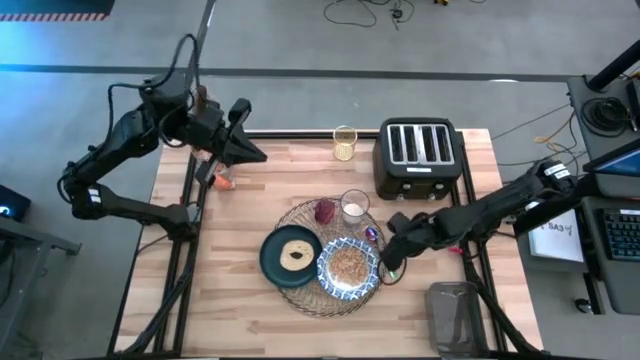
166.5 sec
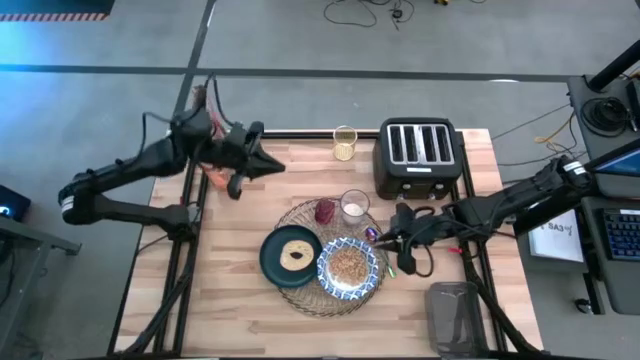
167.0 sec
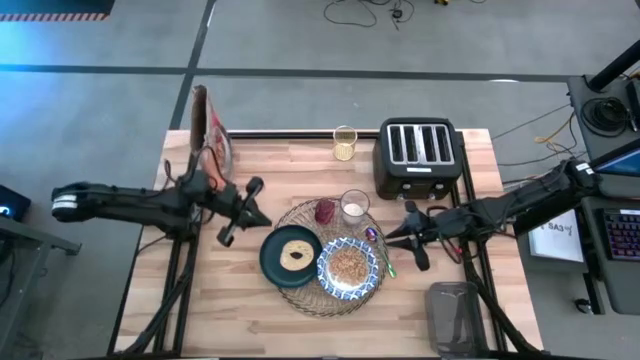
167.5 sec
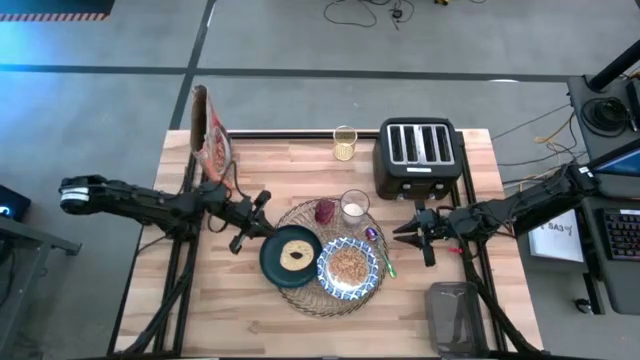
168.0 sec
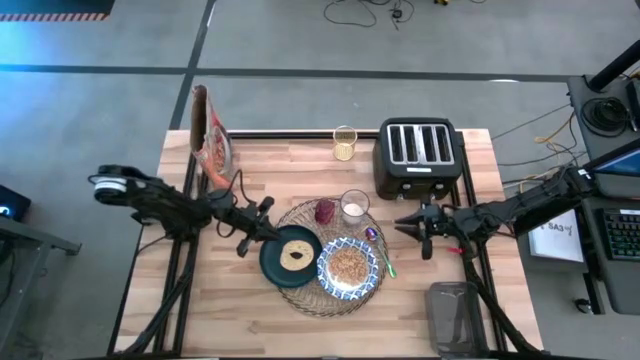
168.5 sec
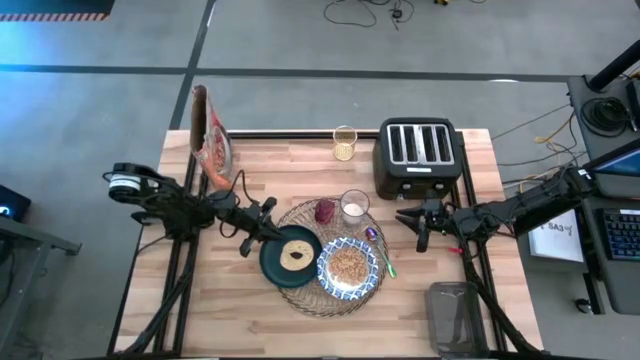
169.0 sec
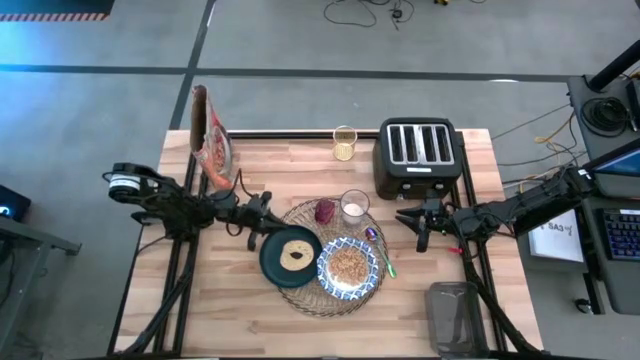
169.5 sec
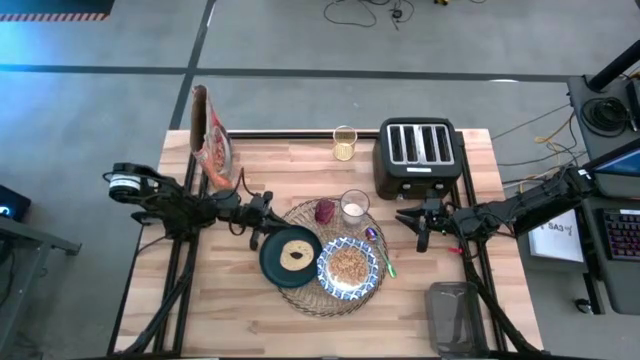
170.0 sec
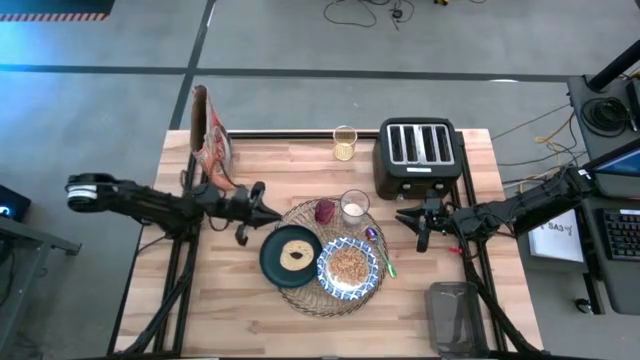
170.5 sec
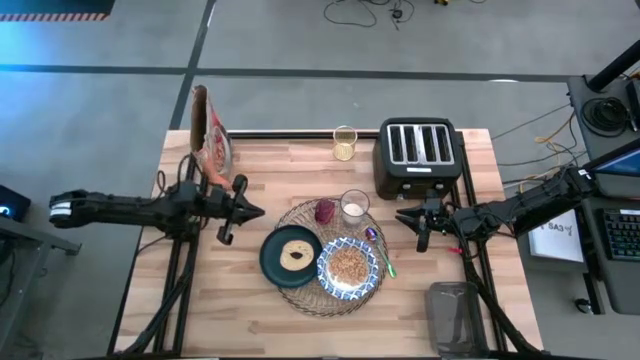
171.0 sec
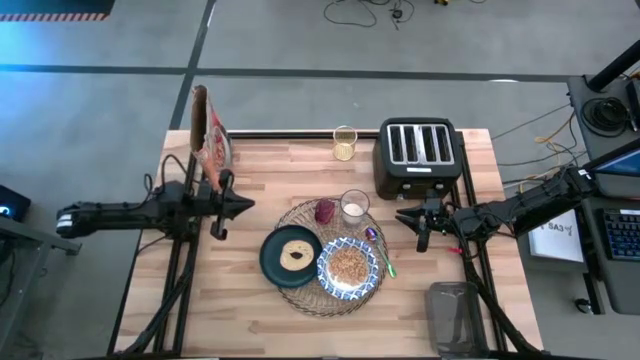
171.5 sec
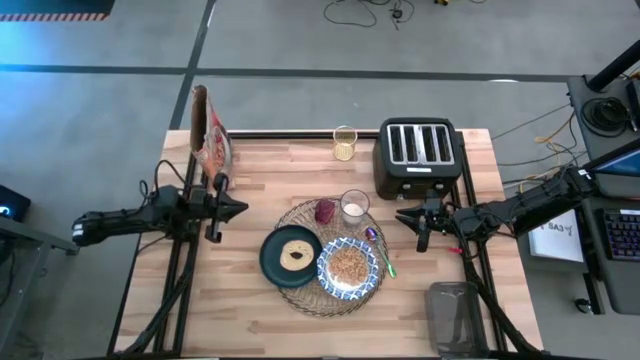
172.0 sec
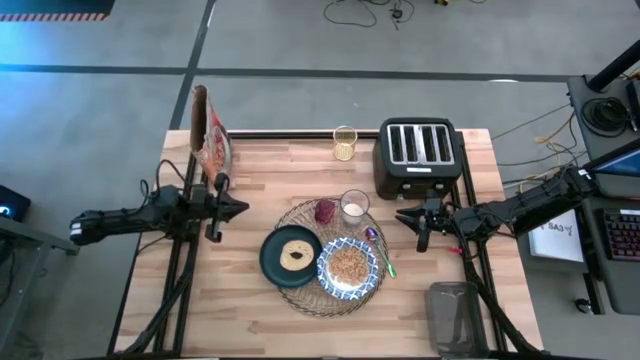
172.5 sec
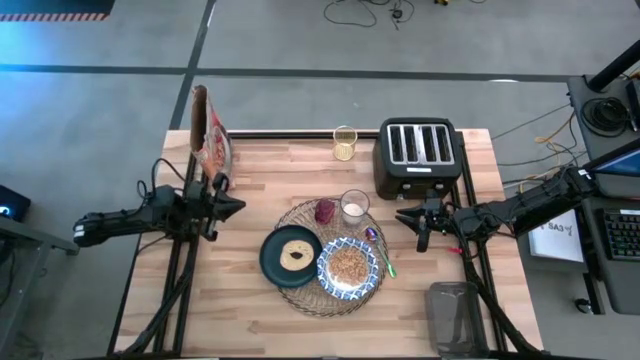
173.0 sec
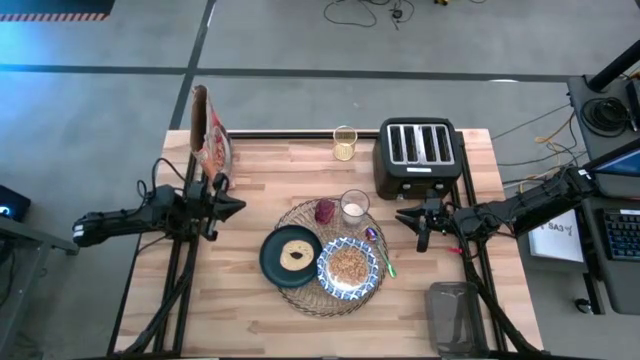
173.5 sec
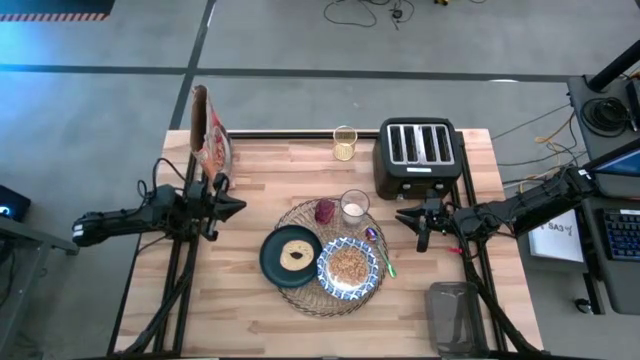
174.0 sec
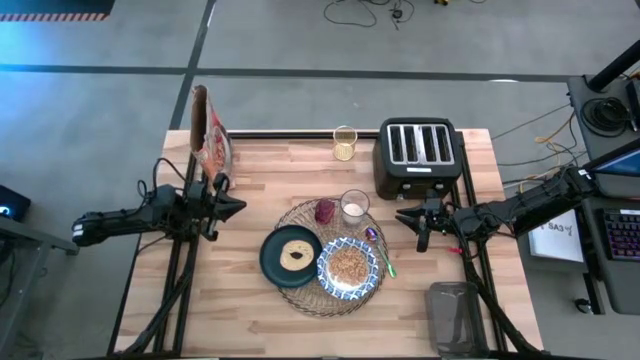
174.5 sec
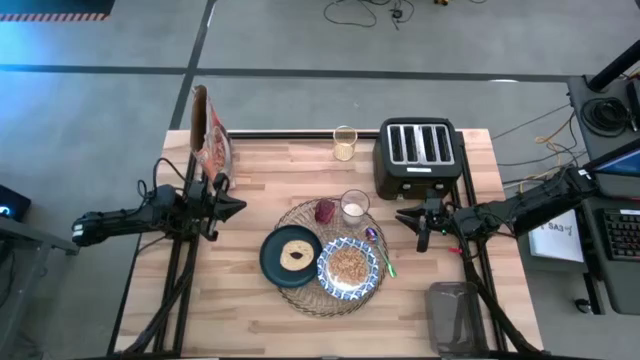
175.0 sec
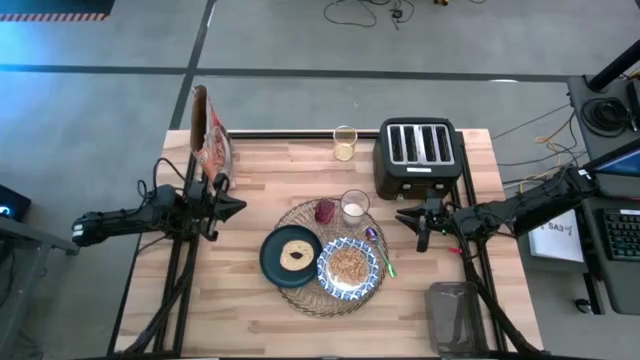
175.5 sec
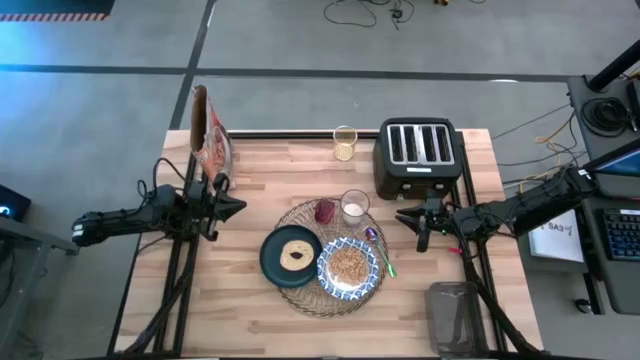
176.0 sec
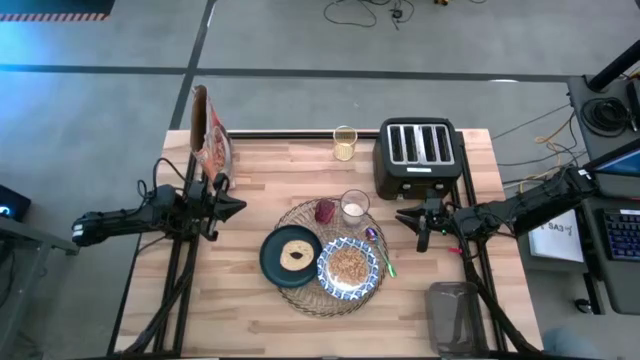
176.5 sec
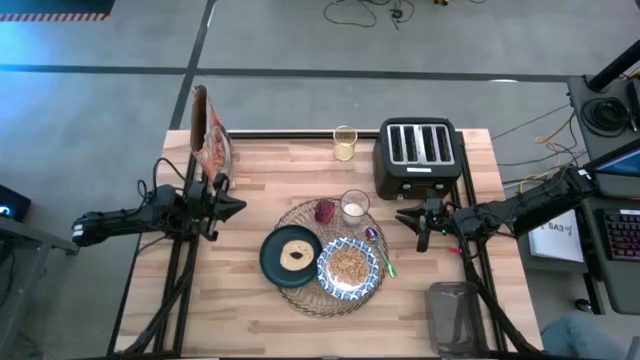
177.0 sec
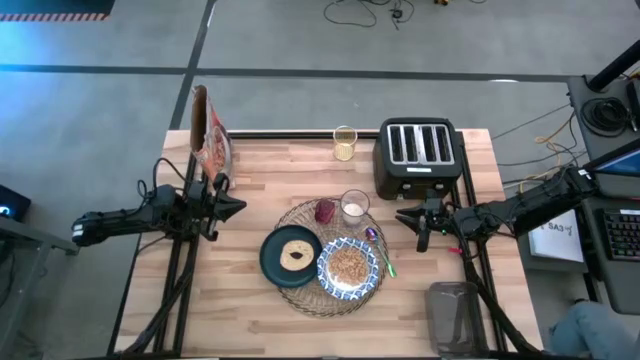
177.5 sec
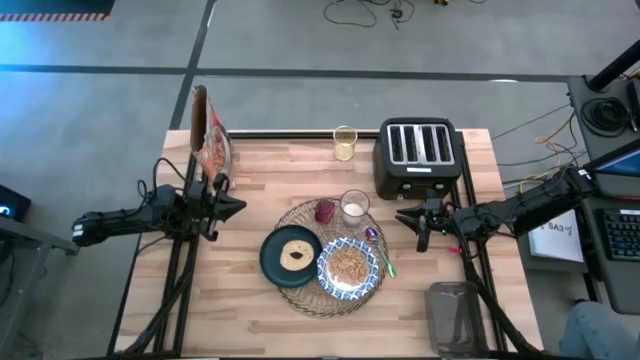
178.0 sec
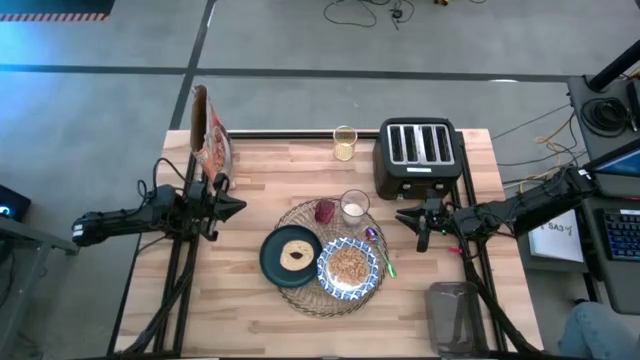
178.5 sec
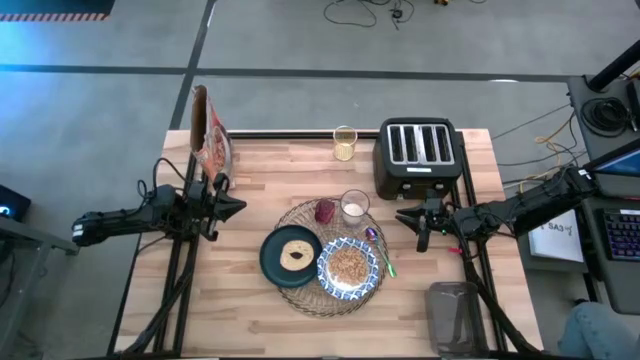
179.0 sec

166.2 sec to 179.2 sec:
Task: Arrange a breakfast setting
Return to Home Position

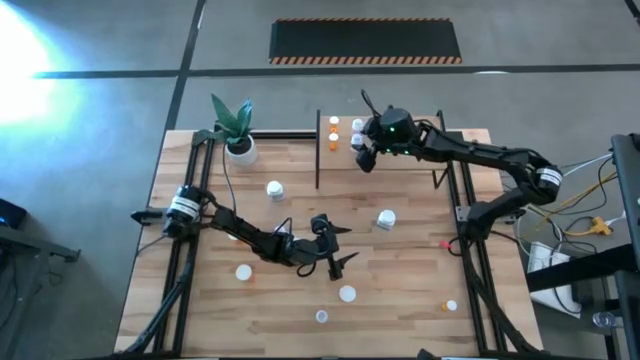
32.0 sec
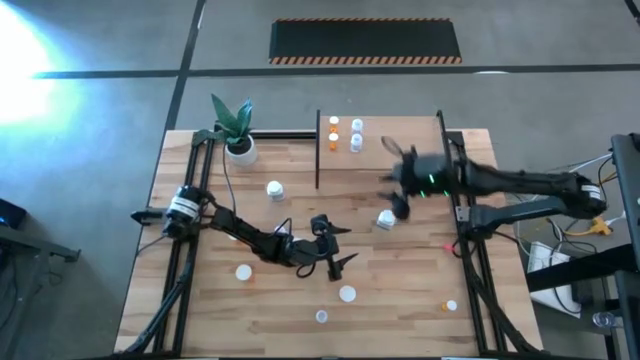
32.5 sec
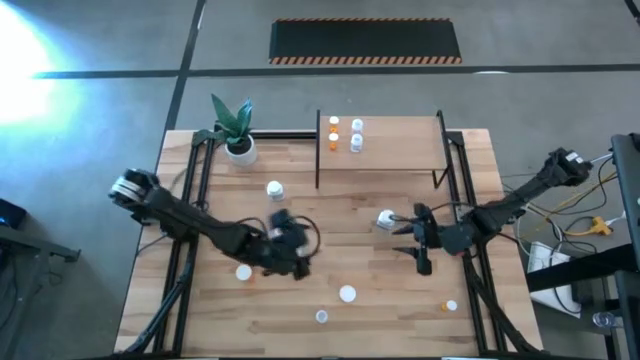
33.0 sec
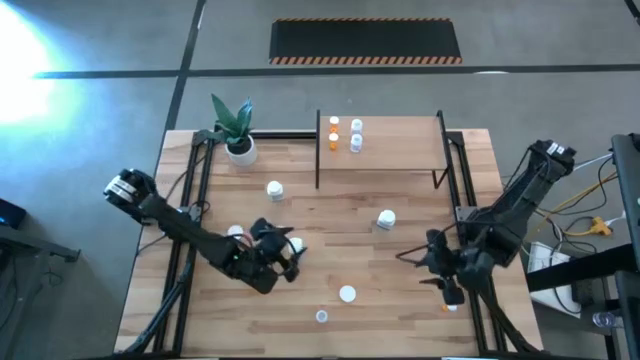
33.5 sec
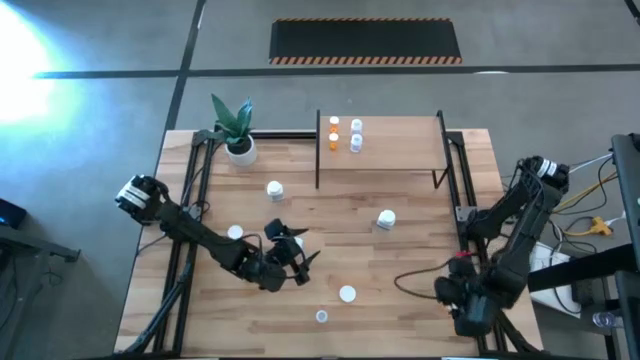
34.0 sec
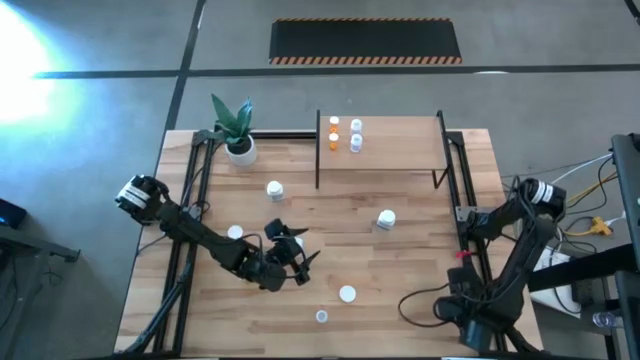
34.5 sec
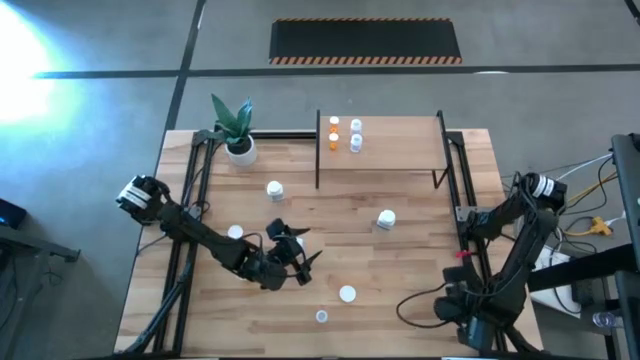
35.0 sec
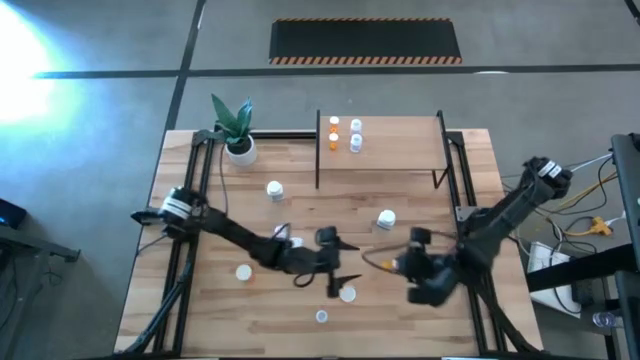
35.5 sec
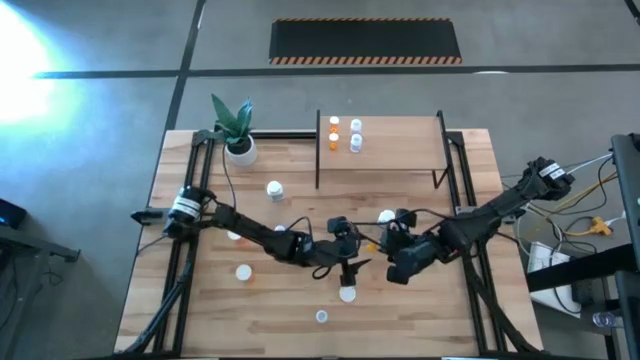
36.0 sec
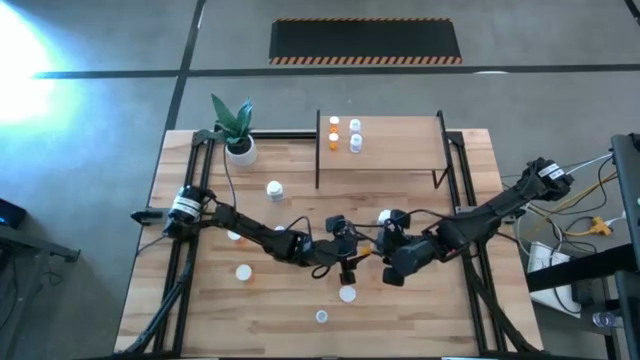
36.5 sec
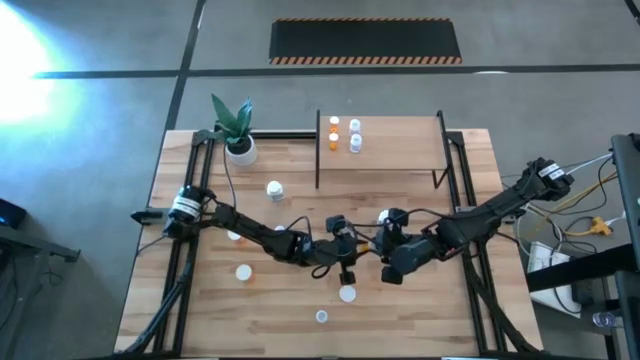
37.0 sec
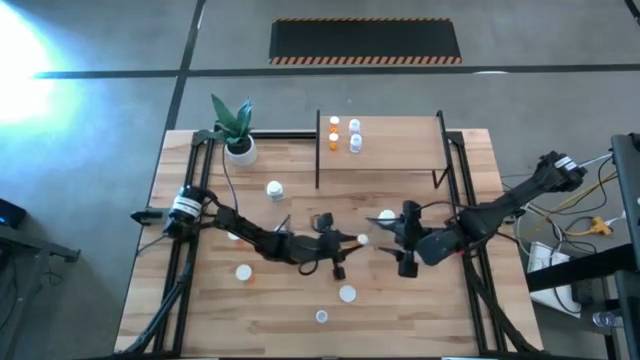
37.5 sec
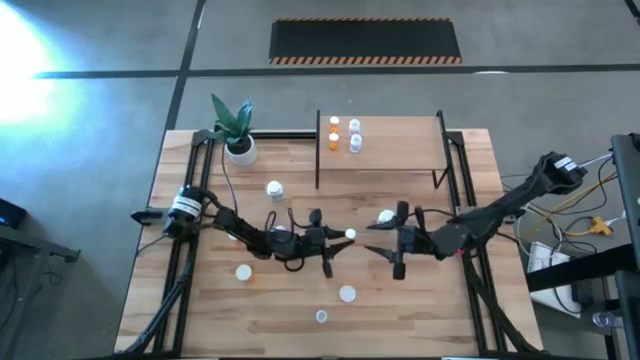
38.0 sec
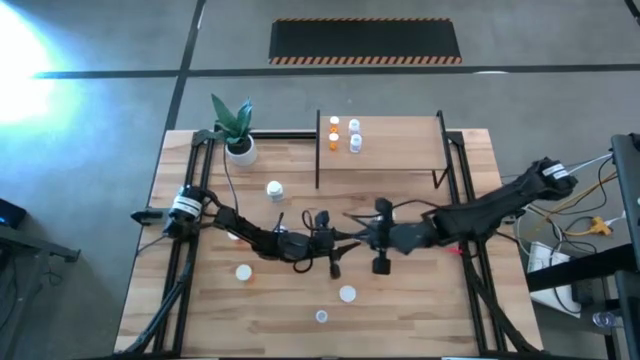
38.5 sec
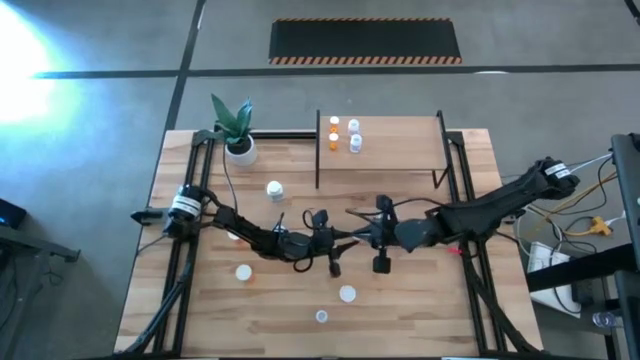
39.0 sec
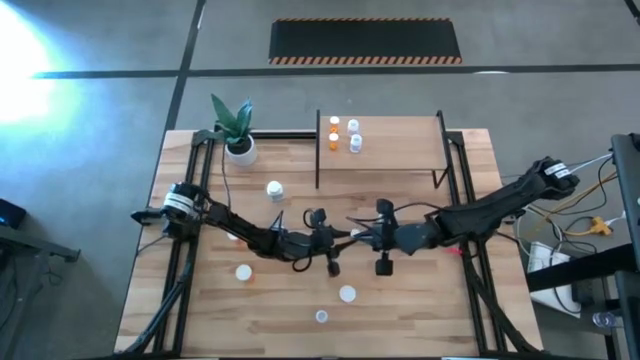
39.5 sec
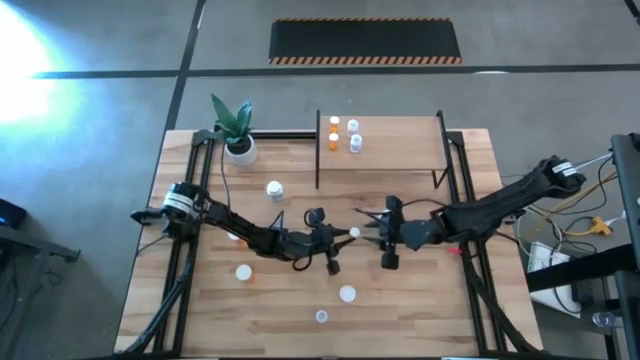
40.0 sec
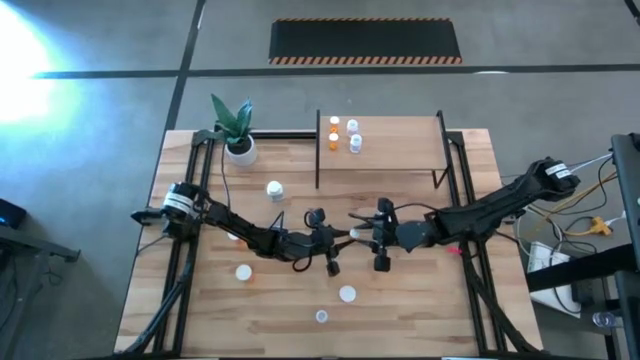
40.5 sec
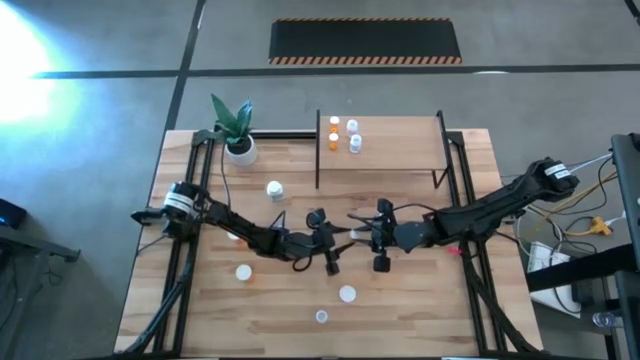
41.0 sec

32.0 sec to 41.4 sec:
Task: Pick and place medicine bottles onto shelf by color
Put the small orange pill bottle on the shelf aligned with the other small orange pill bottles
